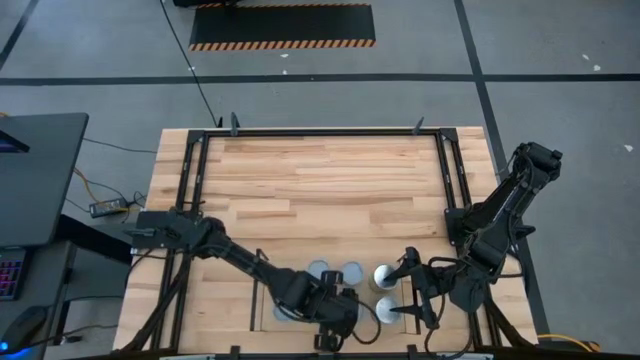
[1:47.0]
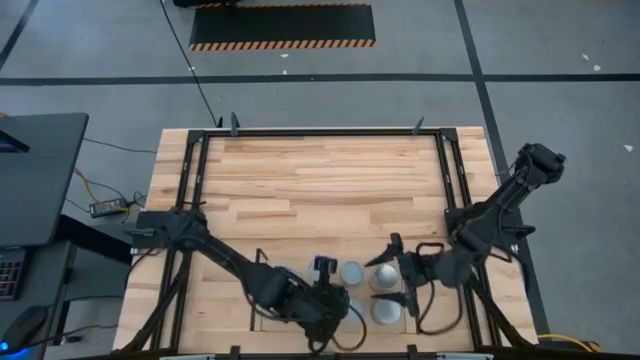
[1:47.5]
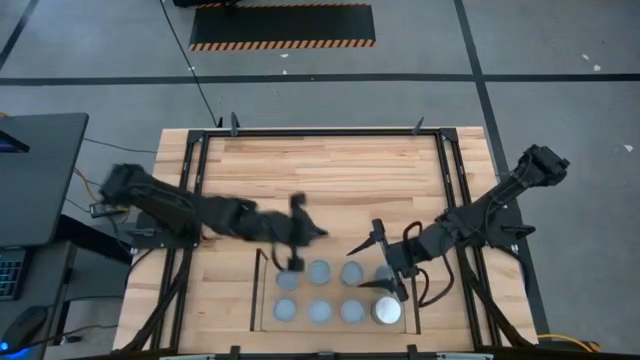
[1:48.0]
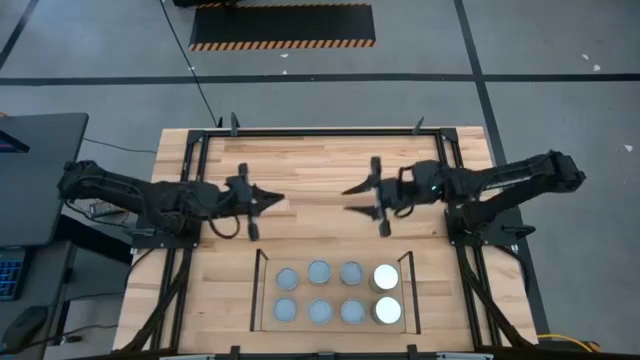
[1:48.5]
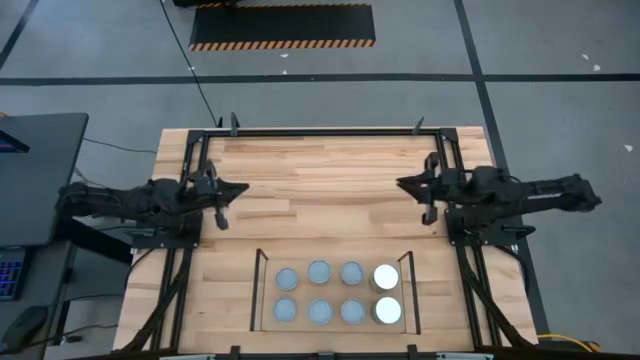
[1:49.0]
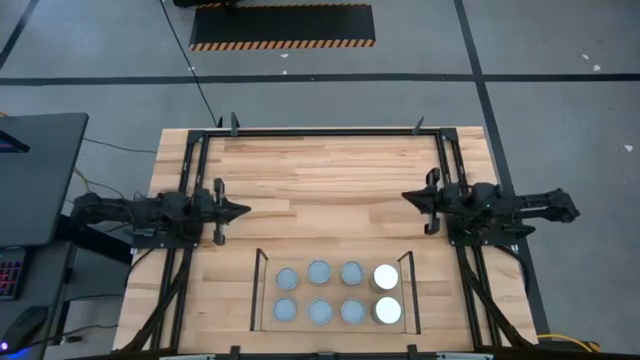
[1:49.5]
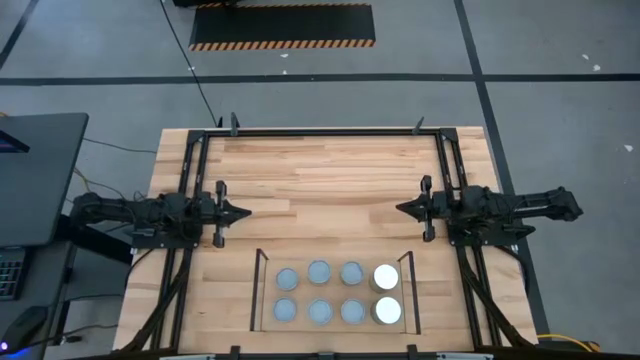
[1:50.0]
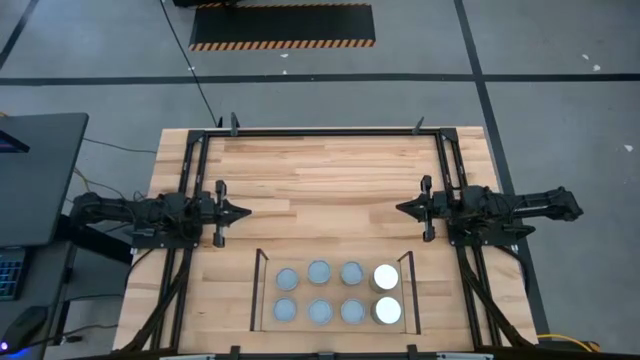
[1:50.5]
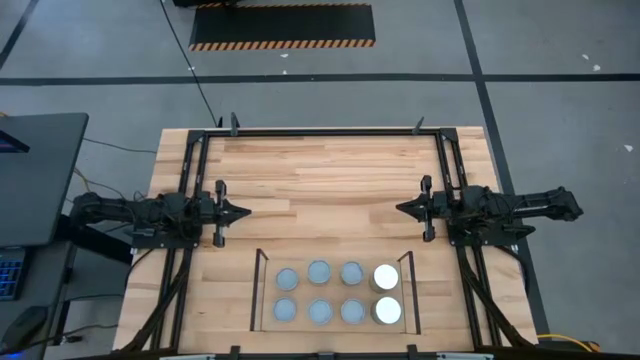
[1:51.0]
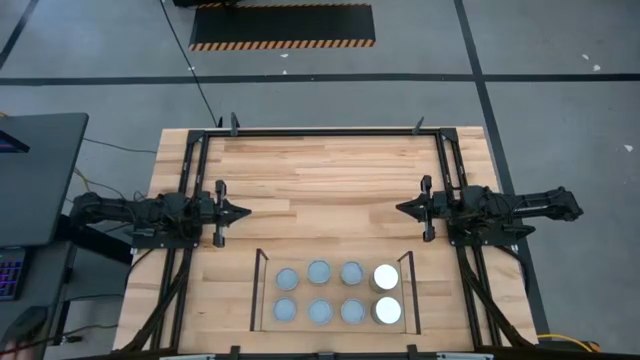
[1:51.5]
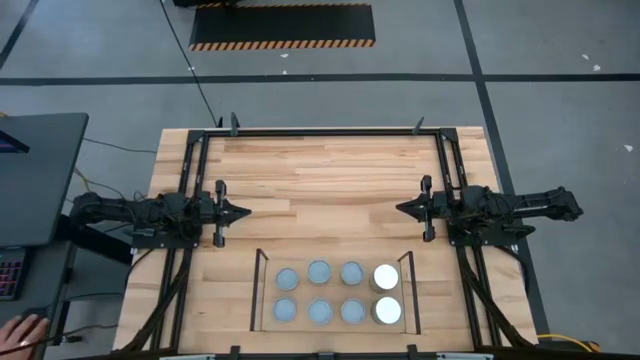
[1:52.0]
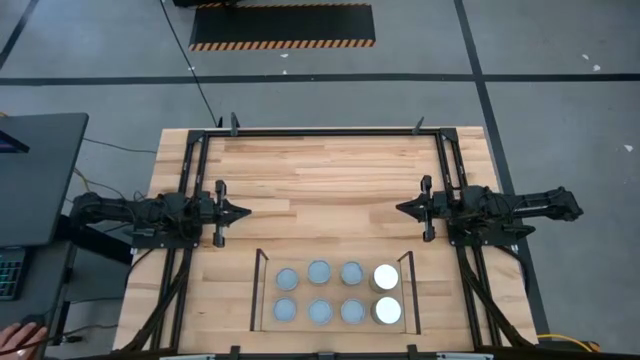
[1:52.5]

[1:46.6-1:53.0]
Task: Pick and place cans onto a shelf
Return to Home Position

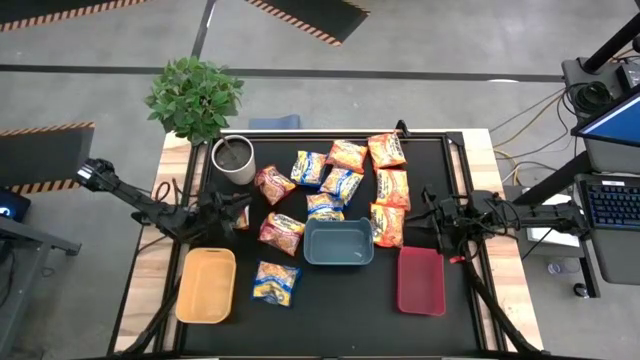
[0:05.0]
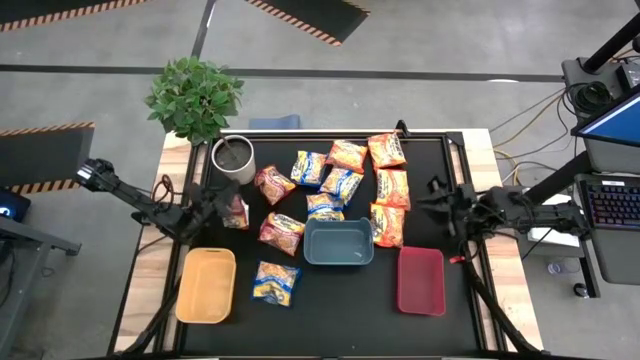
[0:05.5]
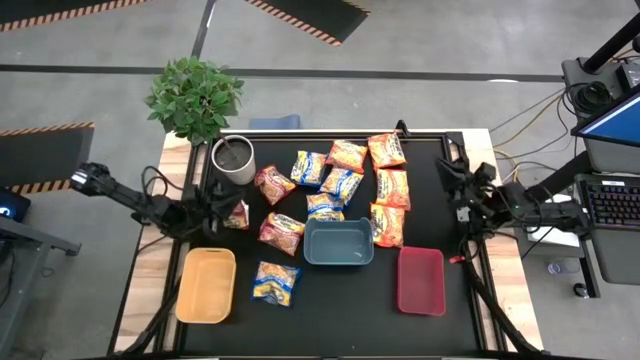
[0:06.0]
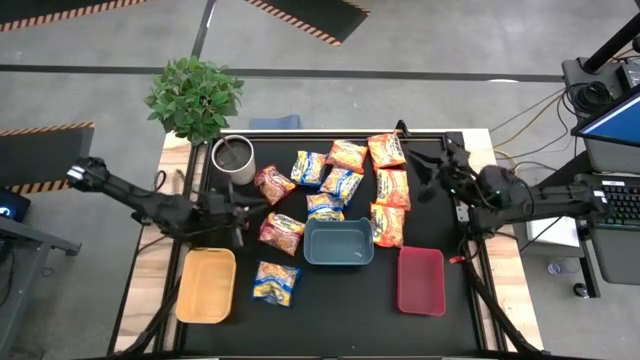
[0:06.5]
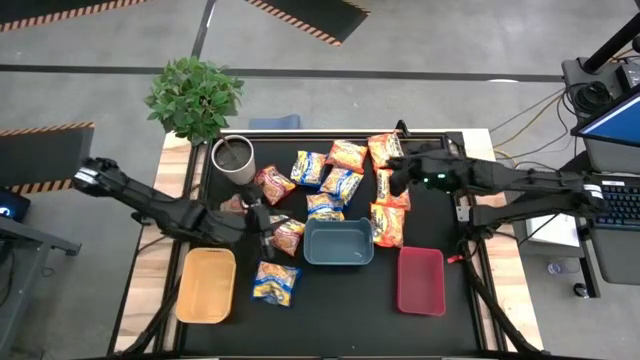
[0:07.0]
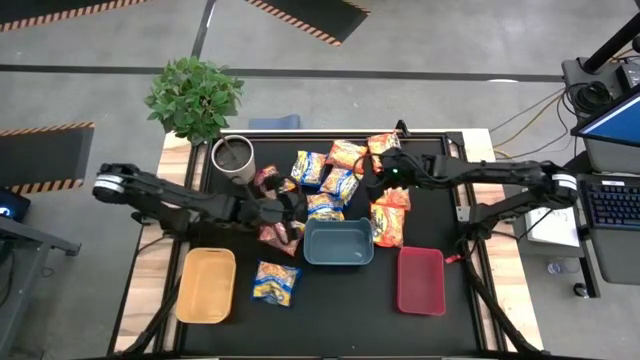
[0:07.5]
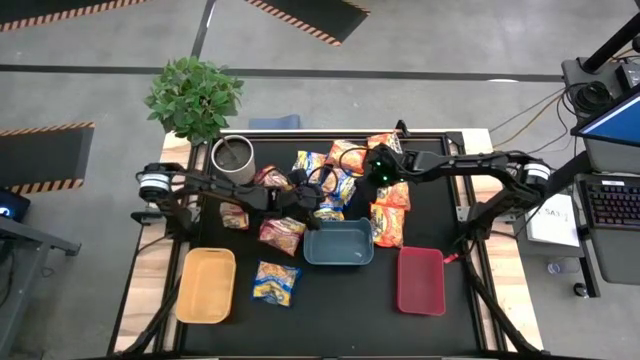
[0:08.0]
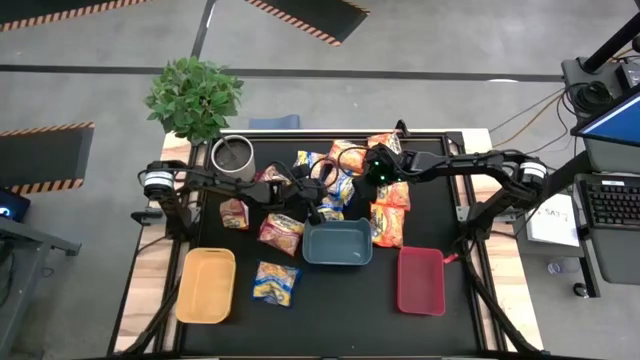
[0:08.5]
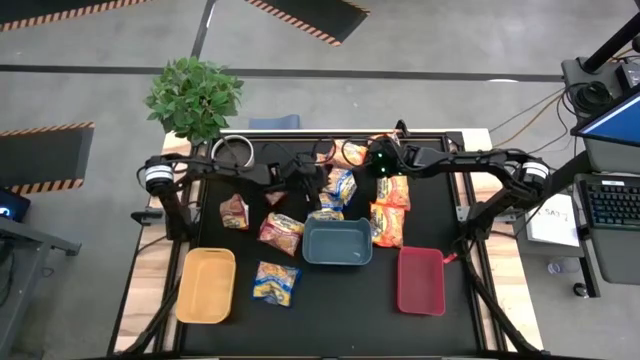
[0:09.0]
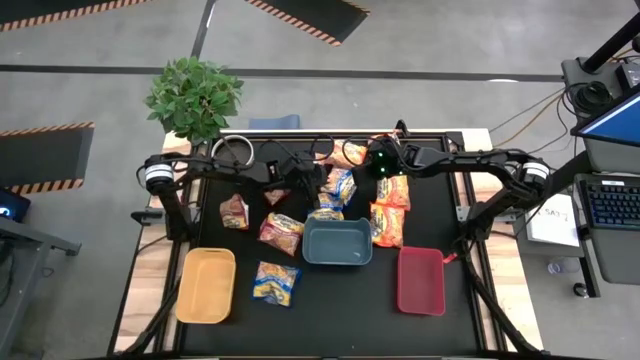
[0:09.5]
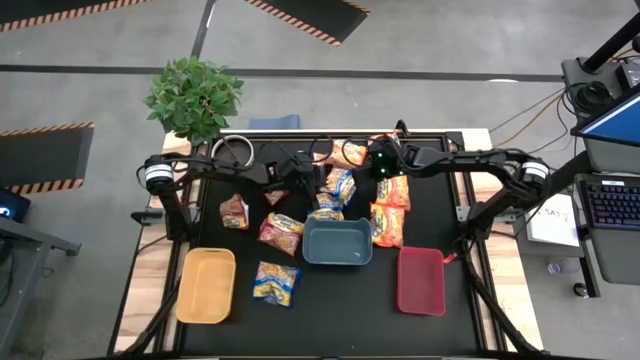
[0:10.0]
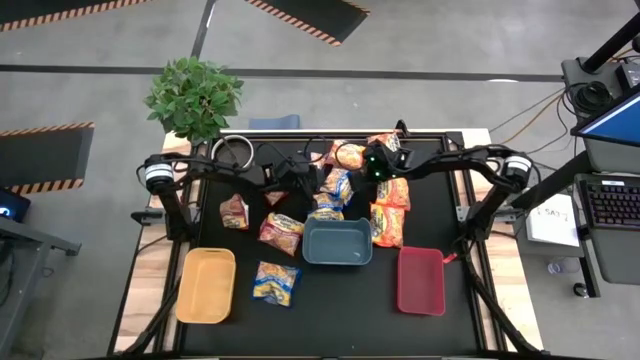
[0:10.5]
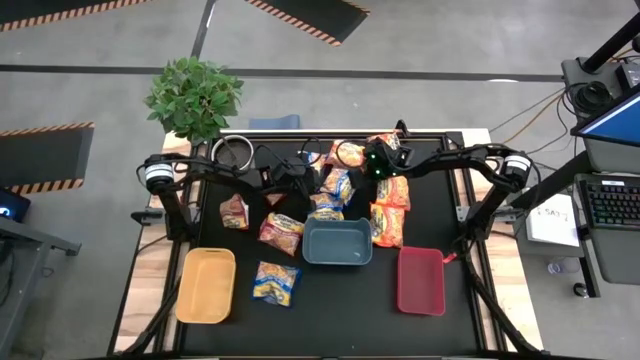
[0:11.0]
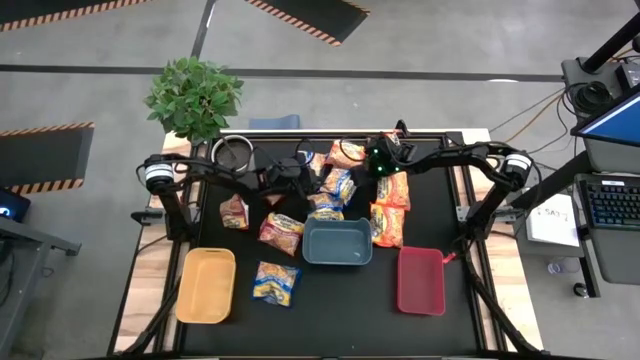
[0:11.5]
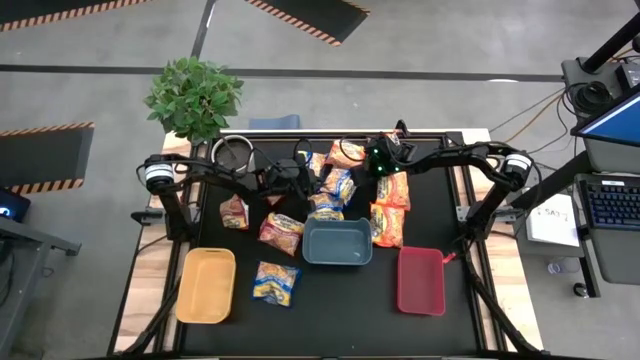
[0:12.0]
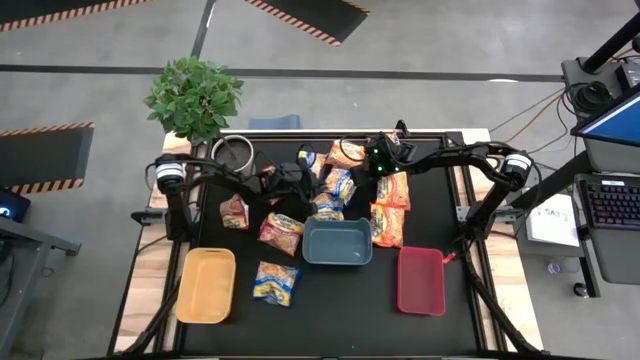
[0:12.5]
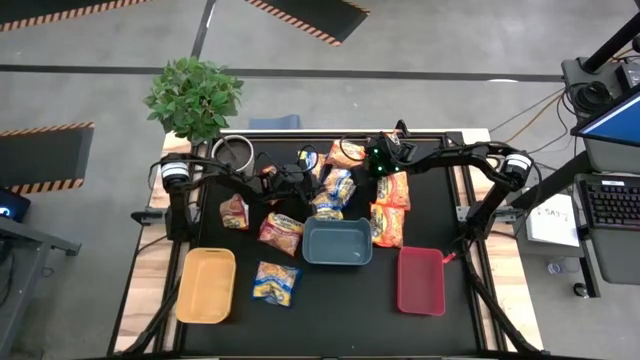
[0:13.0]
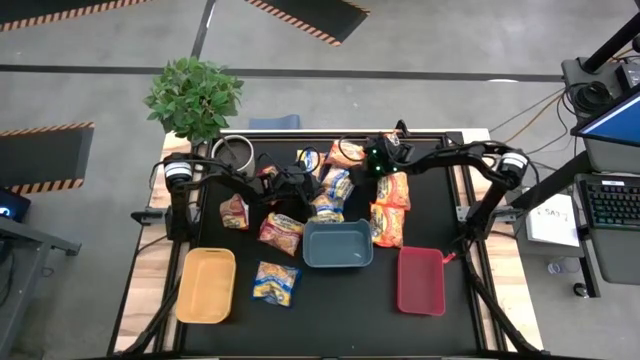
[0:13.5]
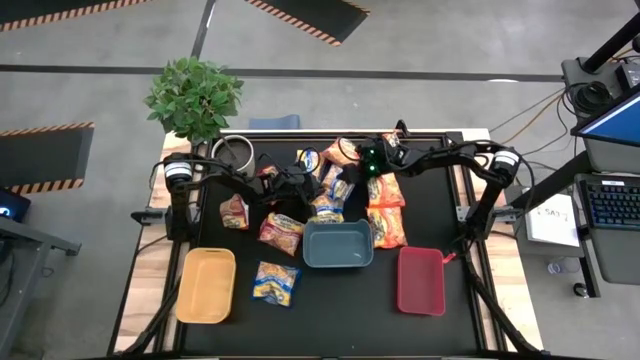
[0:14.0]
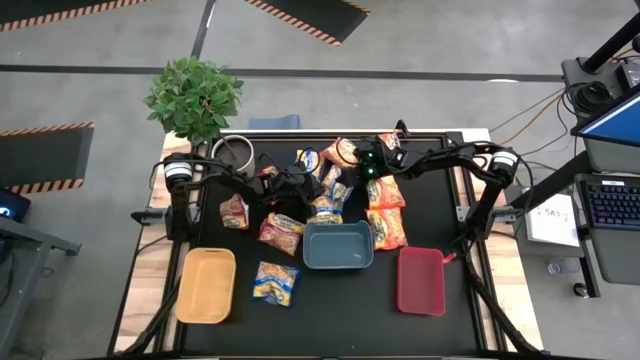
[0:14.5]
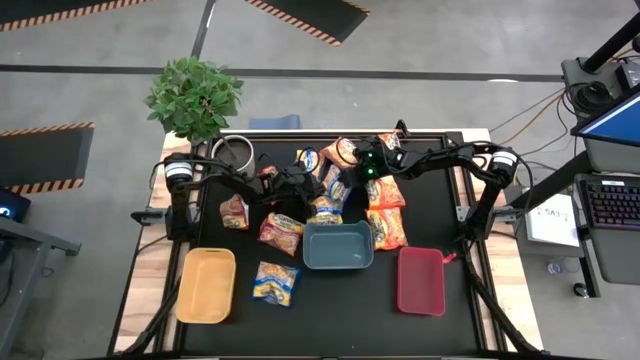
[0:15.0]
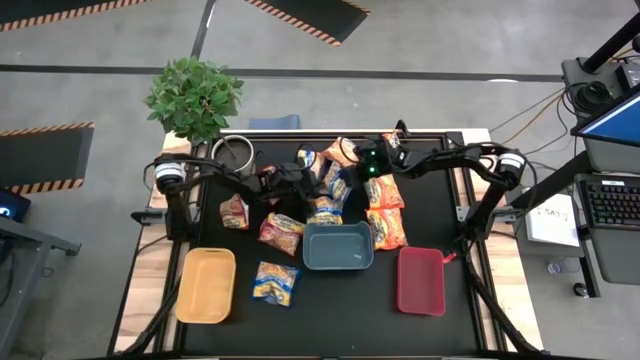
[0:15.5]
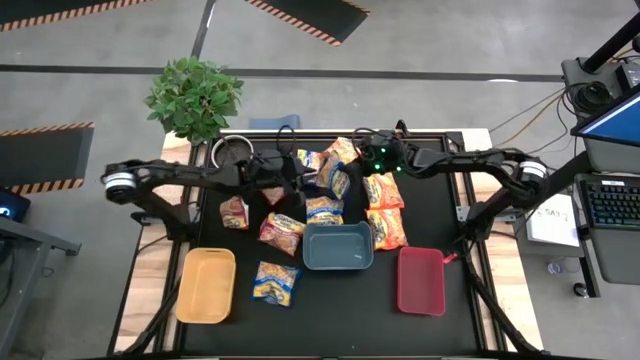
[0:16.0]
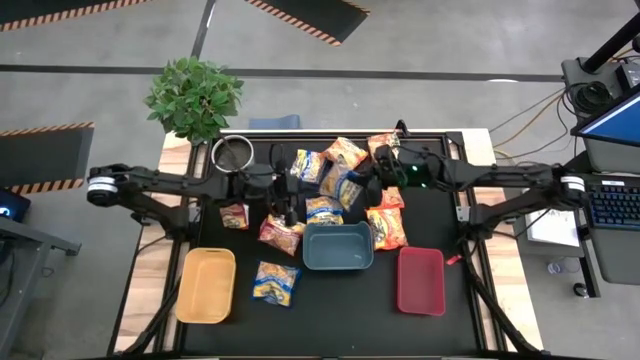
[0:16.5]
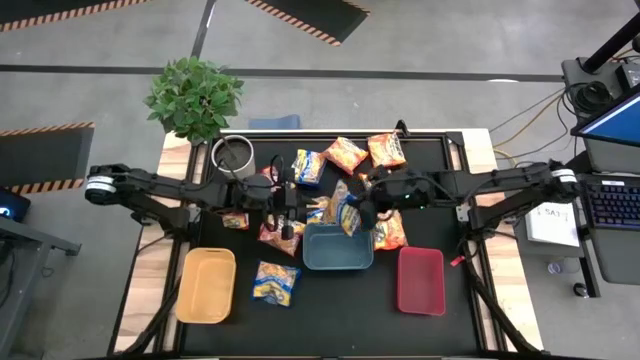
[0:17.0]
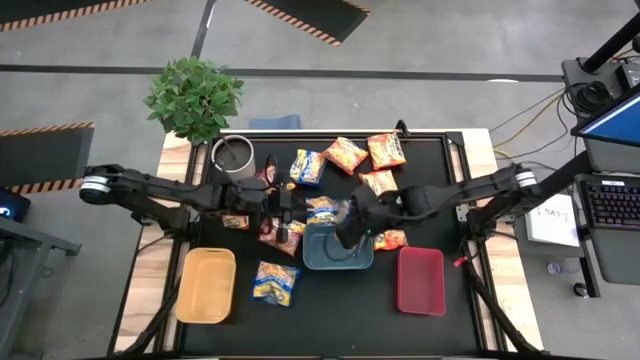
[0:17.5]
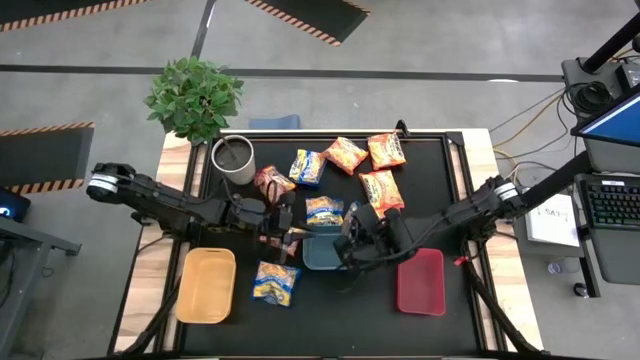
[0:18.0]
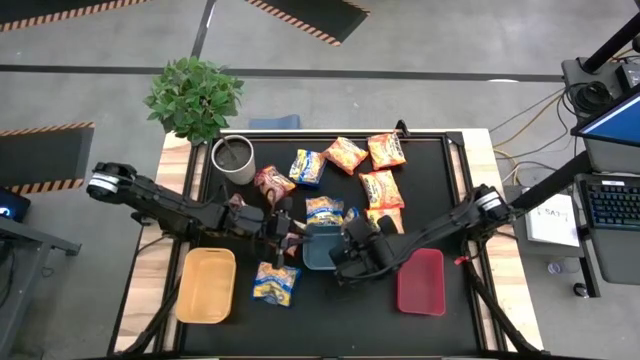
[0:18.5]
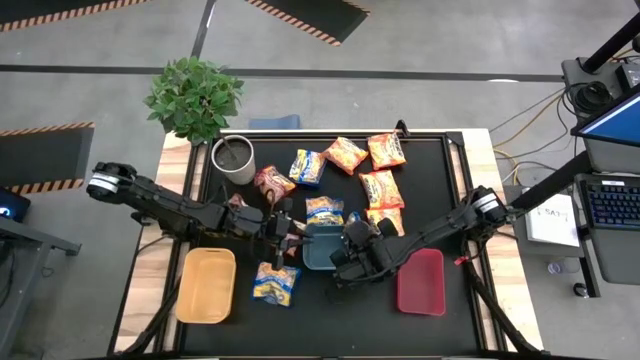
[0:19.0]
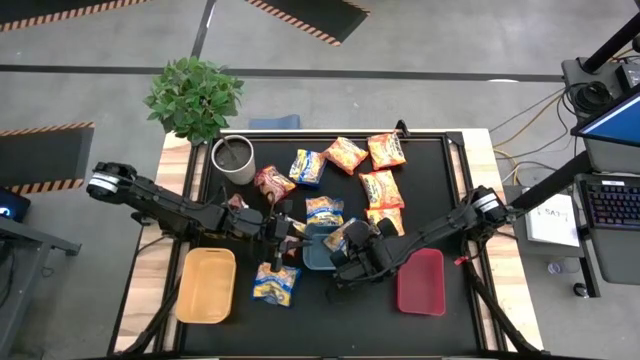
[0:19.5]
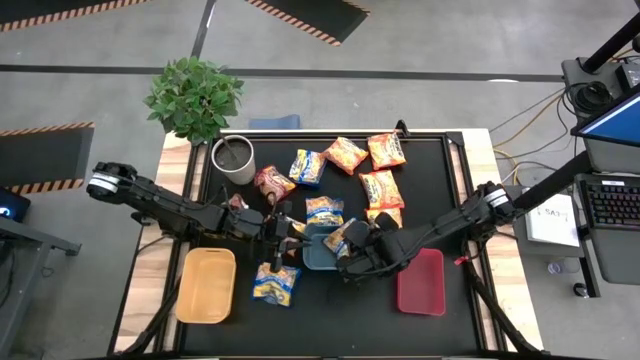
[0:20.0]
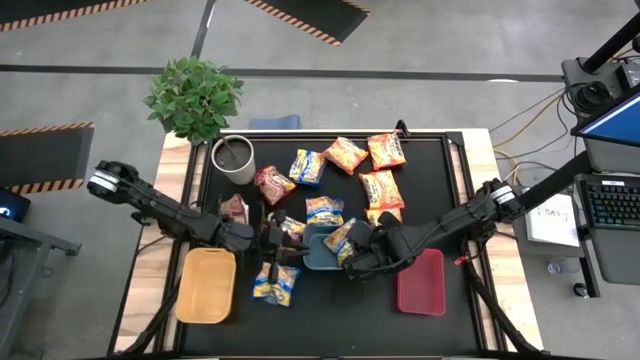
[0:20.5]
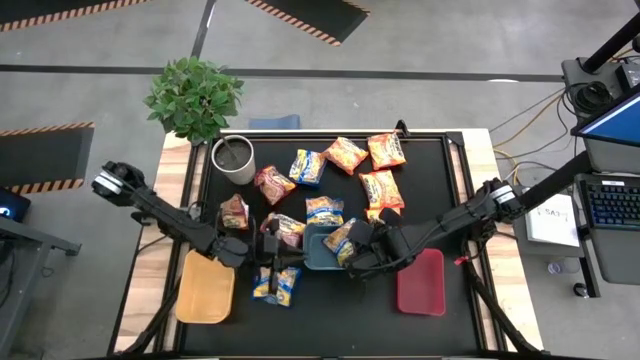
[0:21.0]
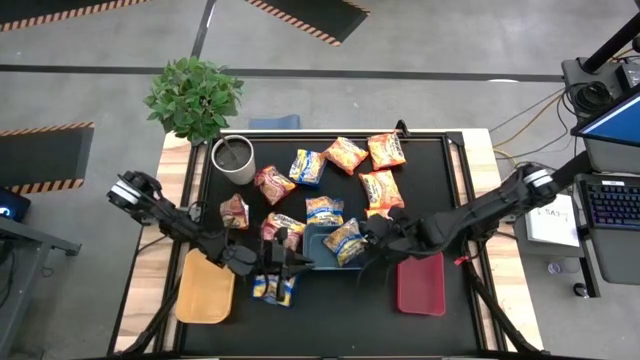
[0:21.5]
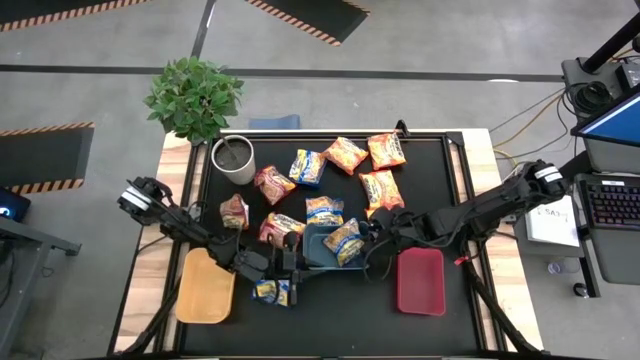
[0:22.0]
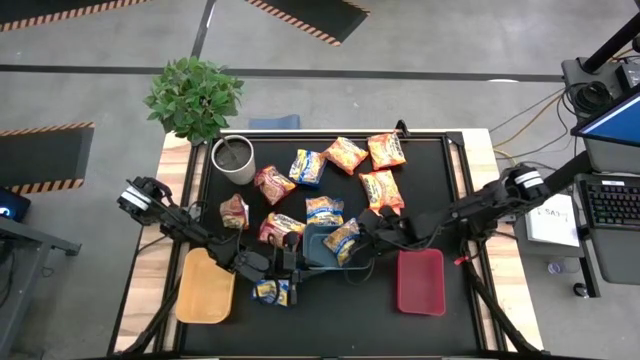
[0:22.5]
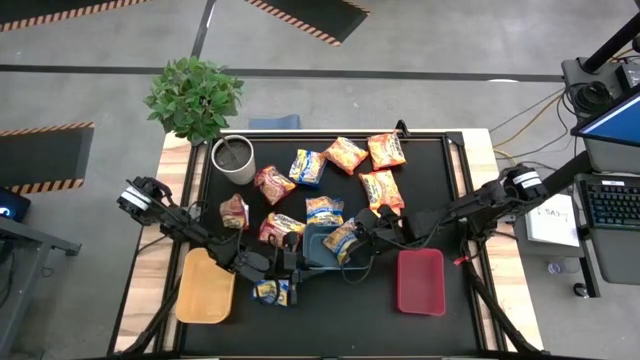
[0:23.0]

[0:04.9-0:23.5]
Task: Sort Maruchan noodles
Put the top right blue noodle pack into the blue bin
